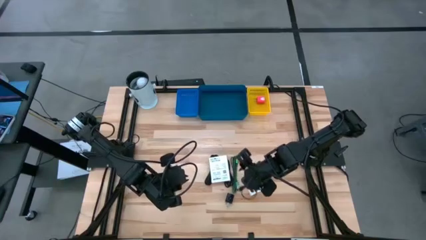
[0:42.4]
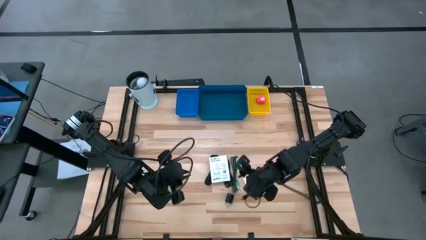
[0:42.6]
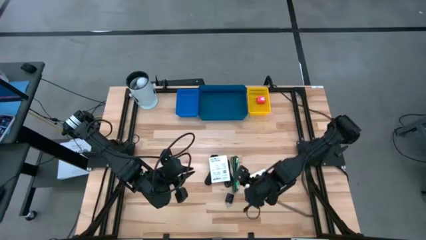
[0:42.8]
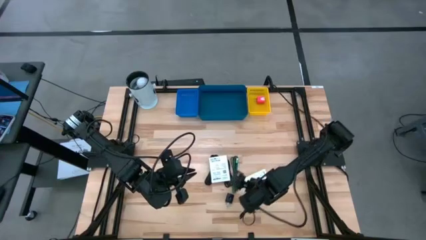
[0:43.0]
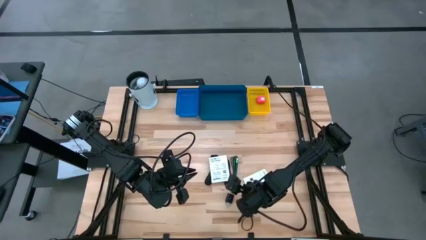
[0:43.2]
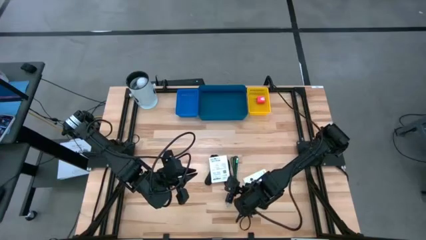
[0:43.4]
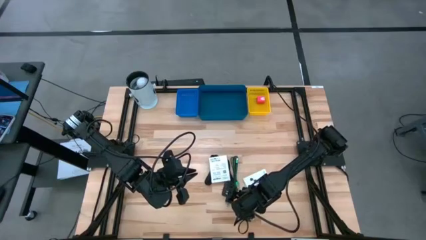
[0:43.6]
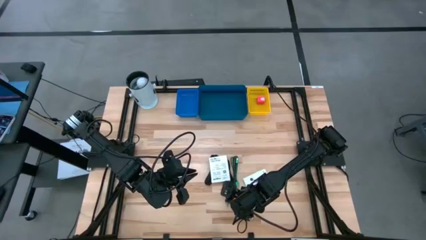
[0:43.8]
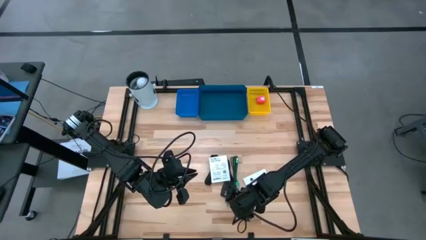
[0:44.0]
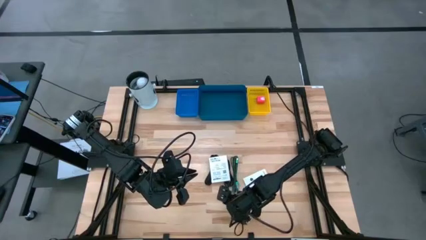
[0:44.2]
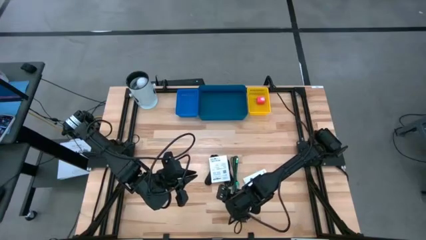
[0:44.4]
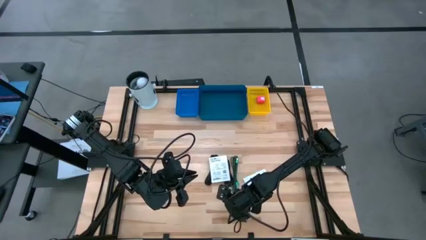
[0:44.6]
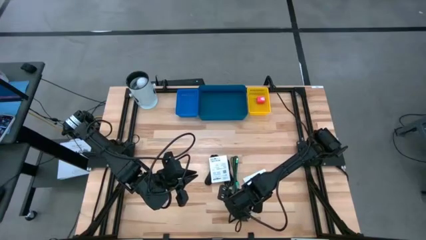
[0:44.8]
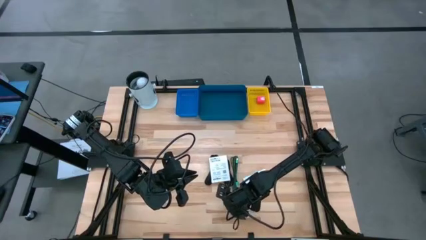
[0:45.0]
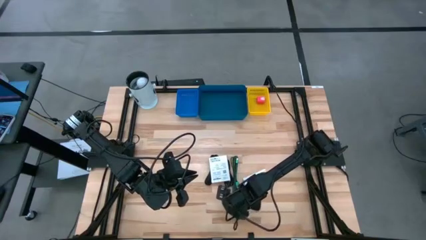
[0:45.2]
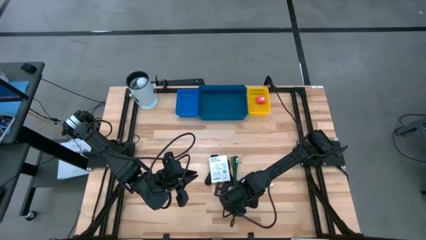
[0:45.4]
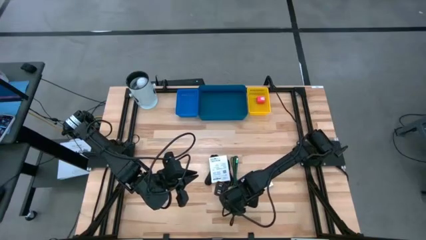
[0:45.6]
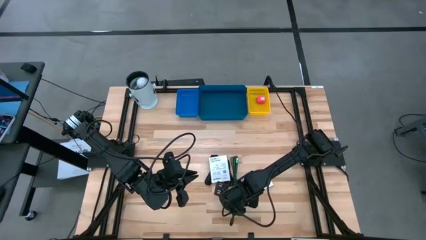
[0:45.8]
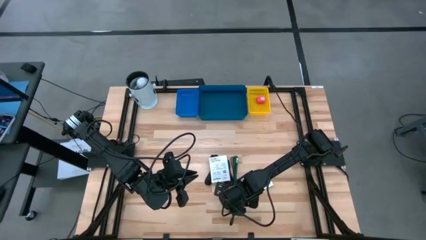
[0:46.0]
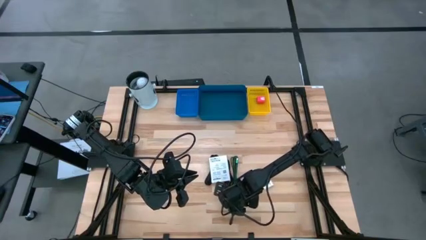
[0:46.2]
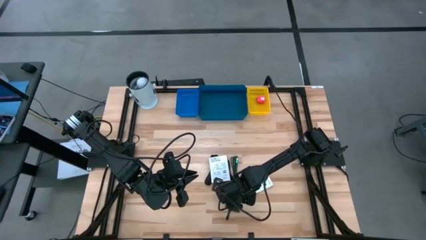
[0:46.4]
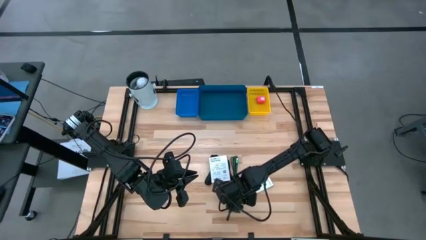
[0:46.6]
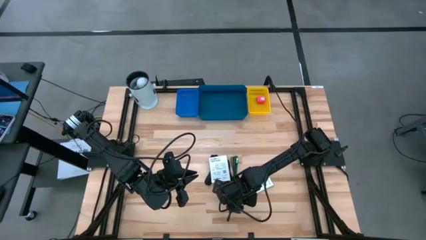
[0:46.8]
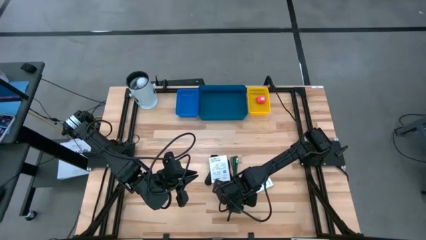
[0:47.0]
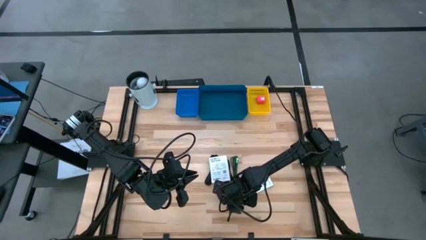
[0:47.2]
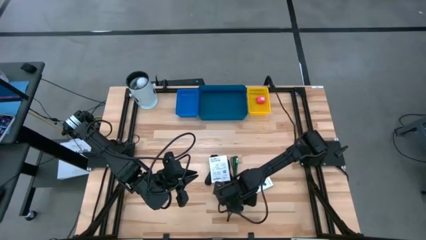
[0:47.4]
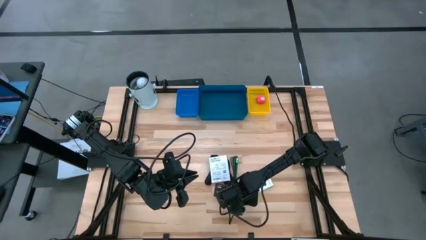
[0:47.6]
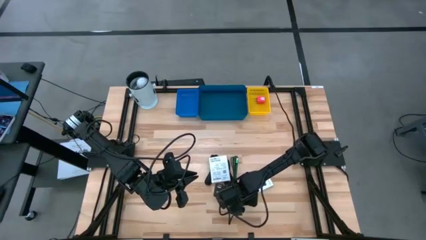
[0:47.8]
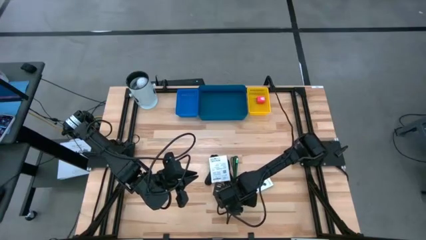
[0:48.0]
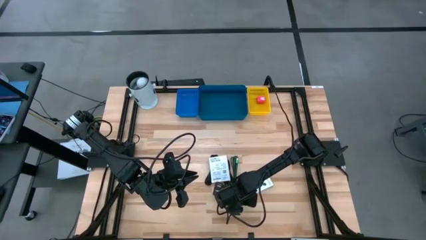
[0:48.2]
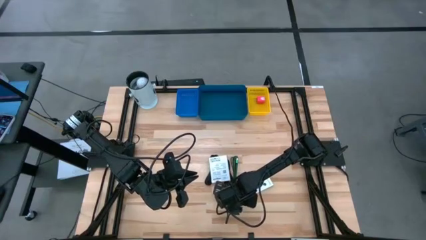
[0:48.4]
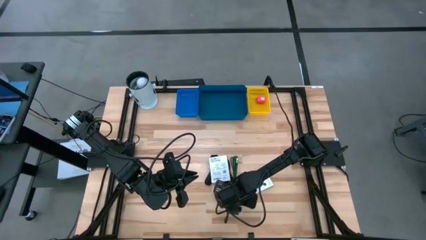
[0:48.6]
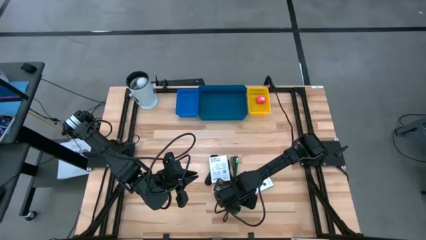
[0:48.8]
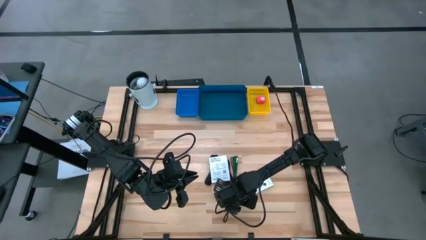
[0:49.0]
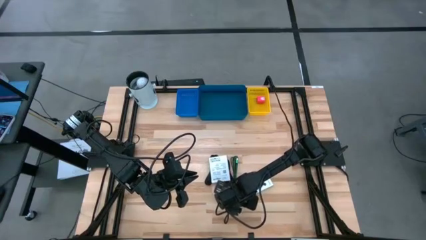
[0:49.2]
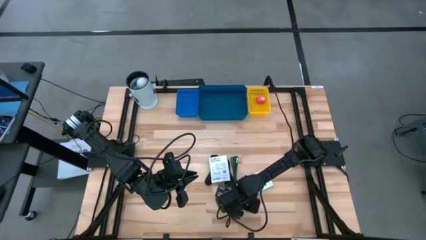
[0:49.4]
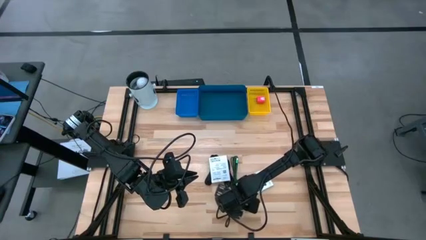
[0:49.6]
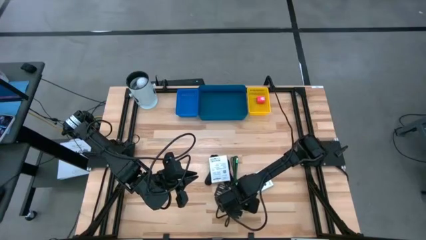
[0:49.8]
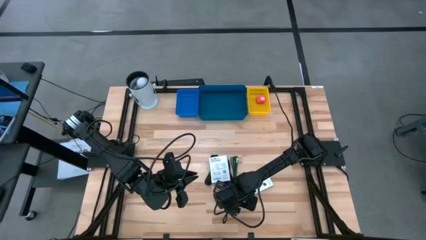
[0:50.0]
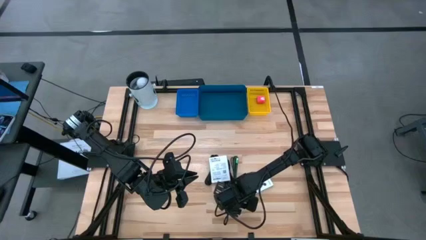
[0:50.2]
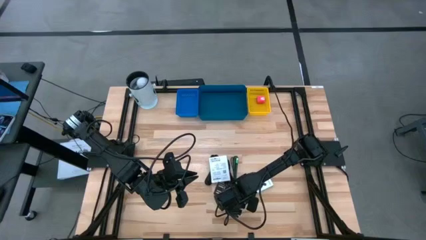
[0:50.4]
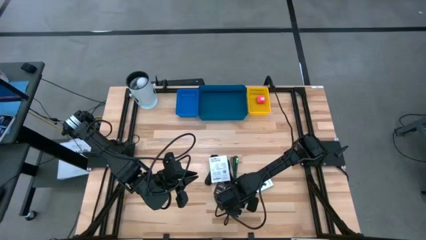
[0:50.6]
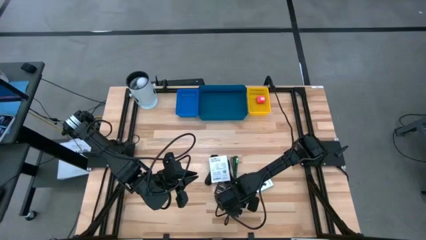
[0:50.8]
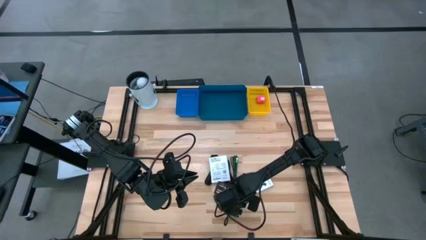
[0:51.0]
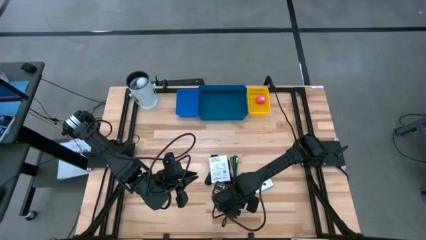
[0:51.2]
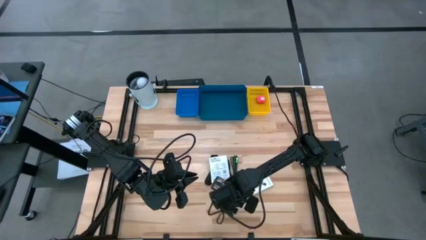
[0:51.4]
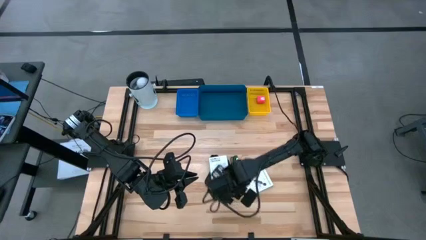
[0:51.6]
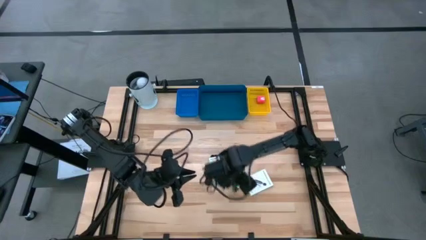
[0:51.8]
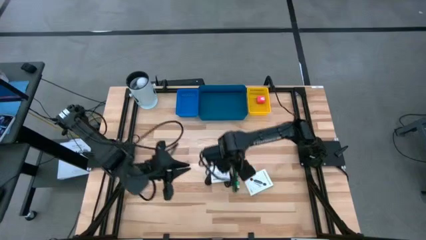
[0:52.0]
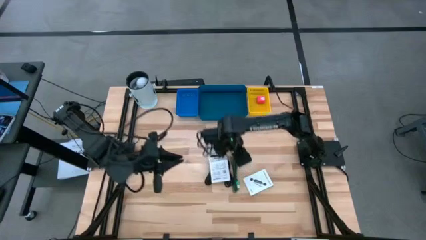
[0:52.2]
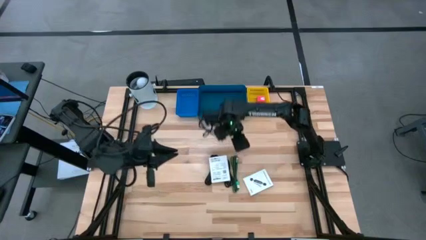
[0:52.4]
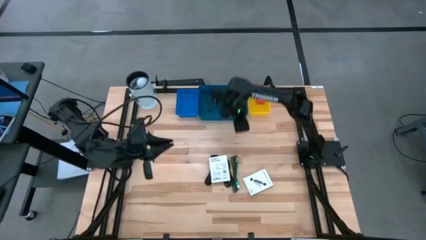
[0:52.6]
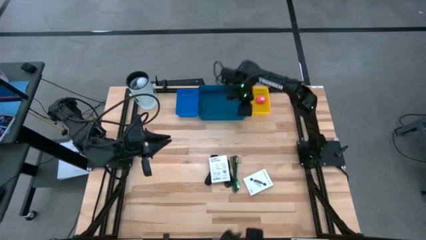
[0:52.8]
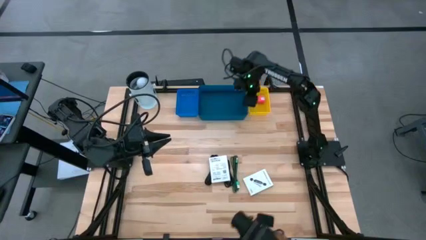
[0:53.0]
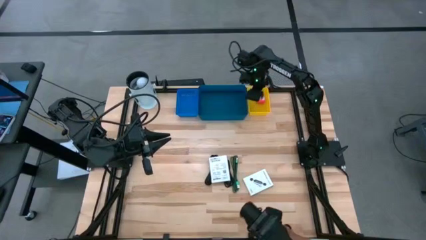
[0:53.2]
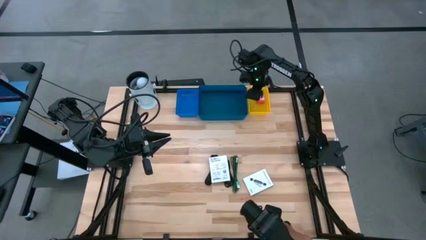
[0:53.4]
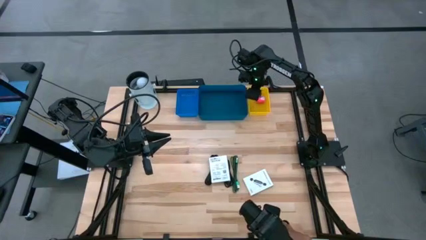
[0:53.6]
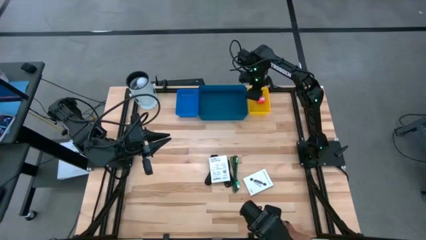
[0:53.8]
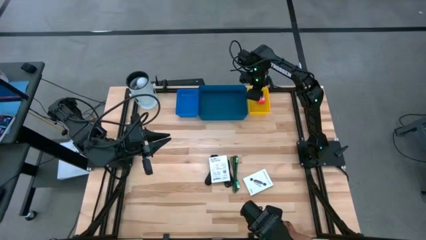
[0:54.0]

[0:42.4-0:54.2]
Task: Pick and place items into bin
Put the black charger adapter into the yellow basket

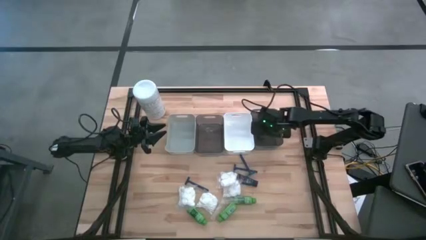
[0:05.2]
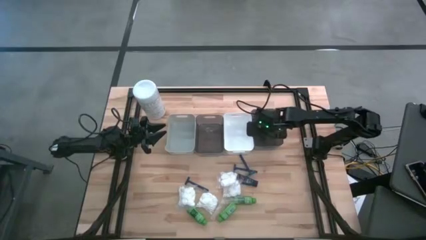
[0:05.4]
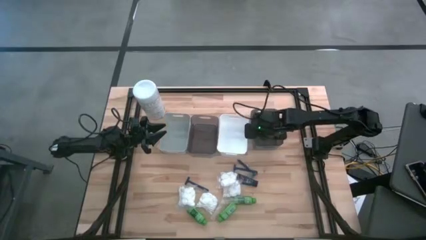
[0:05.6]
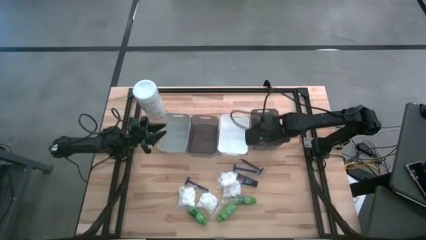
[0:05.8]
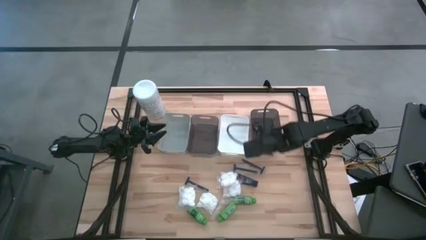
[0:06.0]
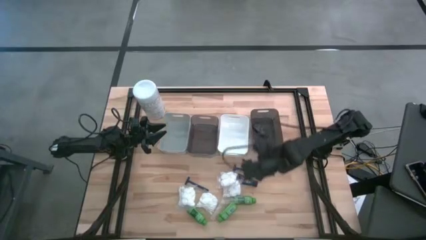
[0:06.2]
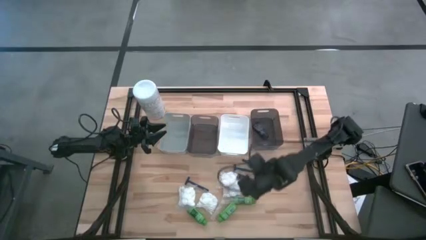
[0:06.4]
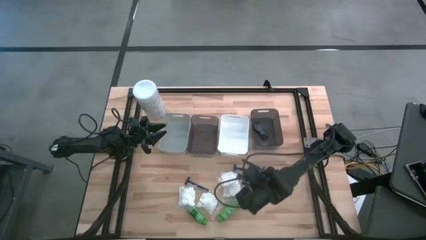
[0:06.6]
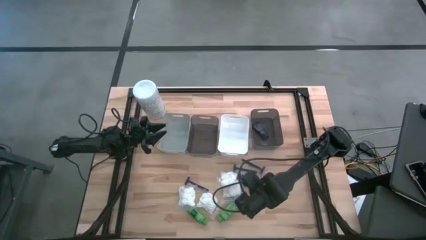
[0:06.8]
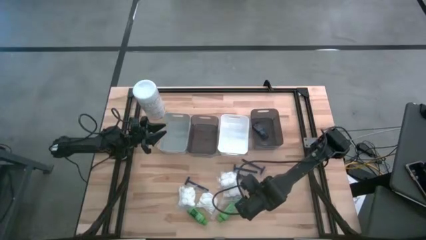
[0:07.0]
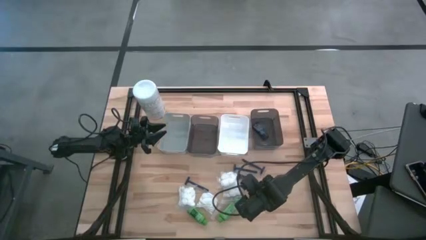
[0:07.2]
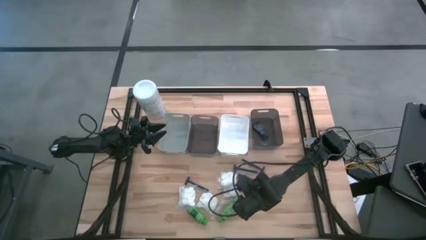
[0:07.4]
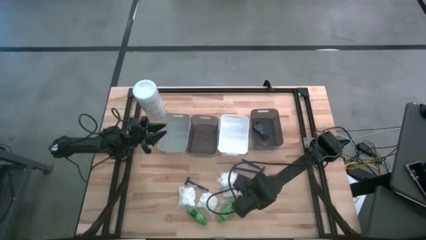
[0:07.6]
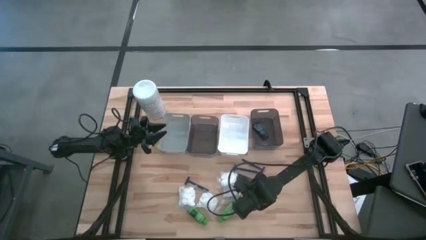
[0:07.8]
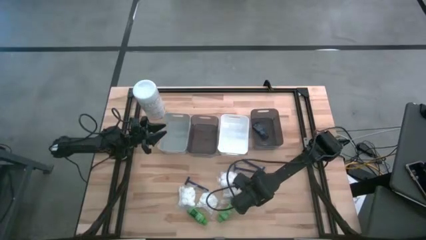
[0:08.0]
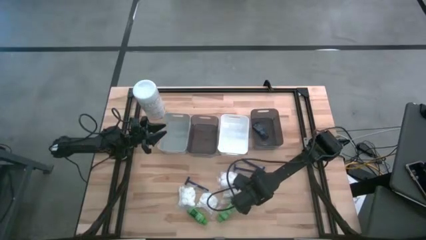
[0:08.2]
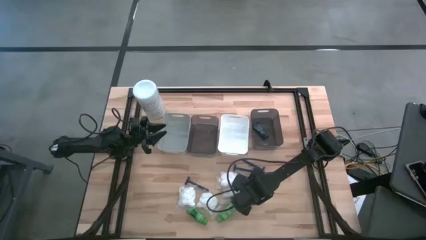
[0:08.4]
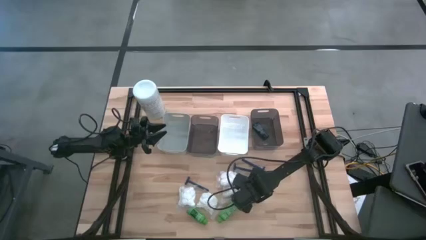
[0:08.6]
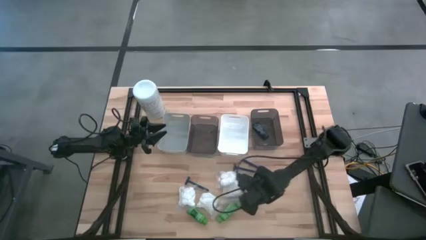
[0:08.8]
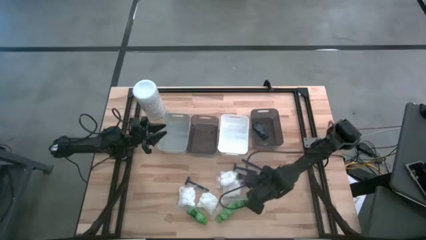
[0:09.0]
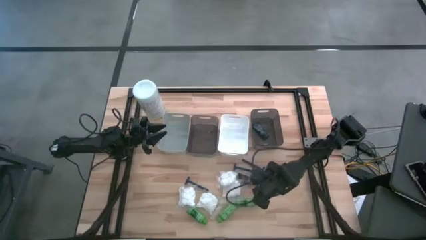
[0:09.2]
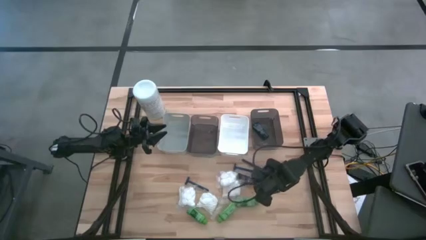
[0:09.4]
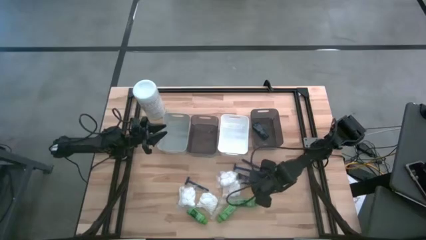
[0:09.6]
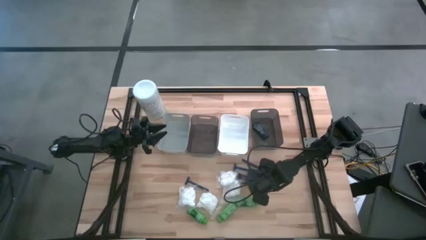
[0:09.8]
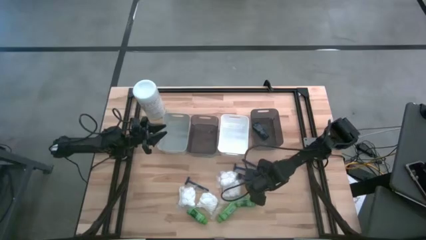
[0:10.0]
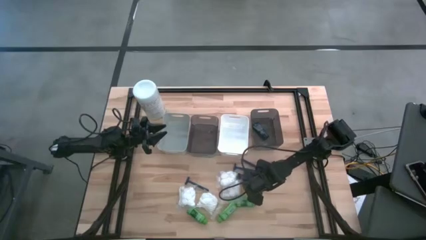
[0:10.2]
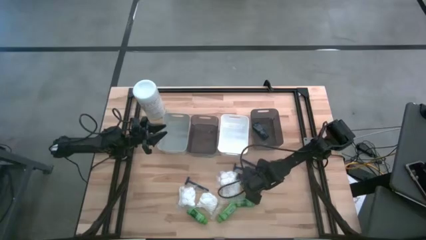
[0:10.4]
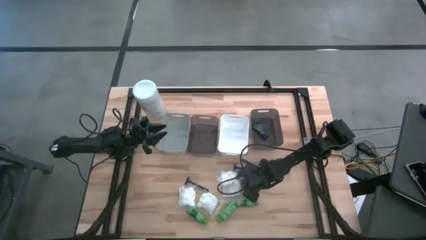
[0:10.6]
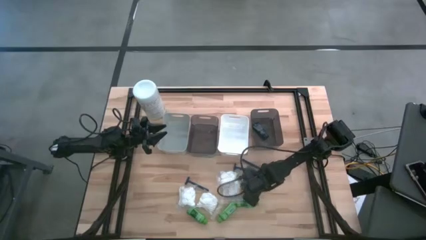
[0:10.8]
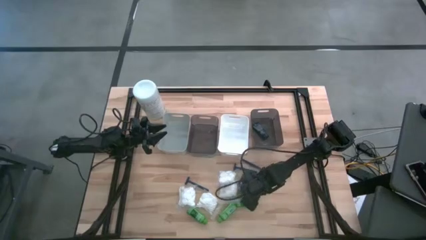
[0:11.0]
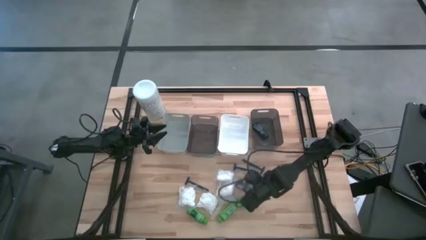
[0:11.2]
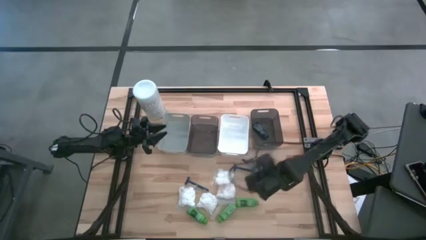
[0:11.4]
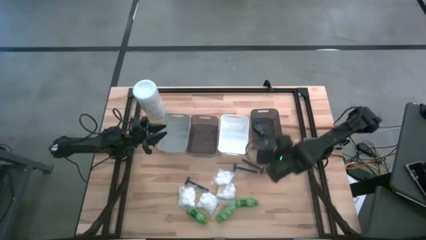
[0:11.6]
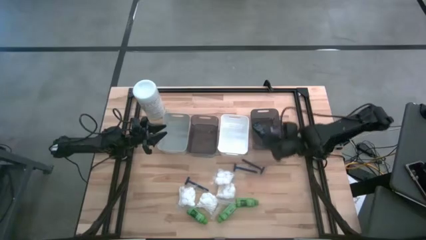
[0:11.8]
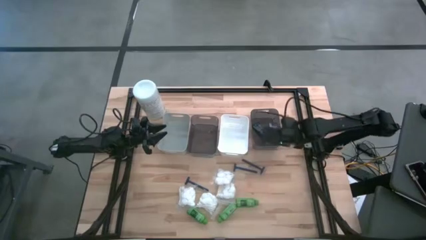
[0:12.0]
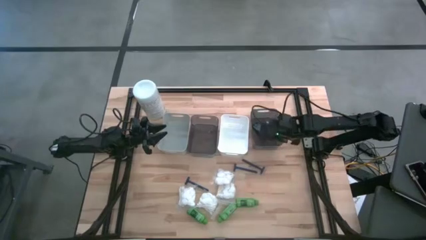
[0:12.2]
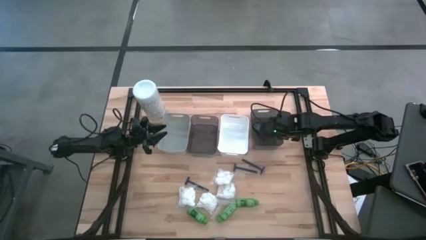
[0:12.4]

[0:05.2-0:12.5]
Task: Pick & Place Travel size toiletries
Put the dark blue shaving cream into the right black bin
